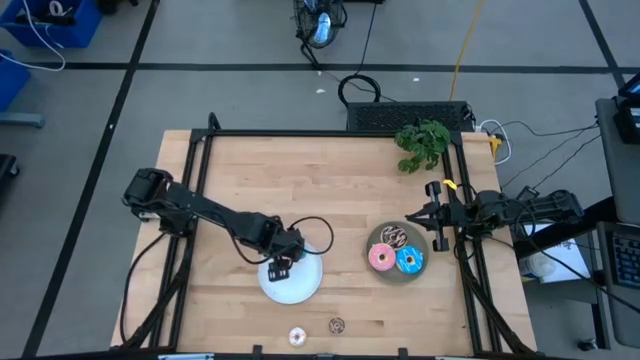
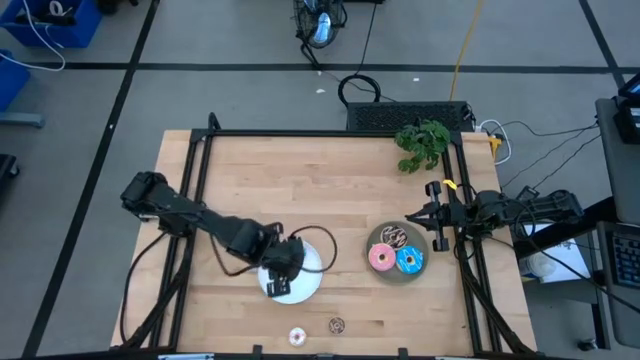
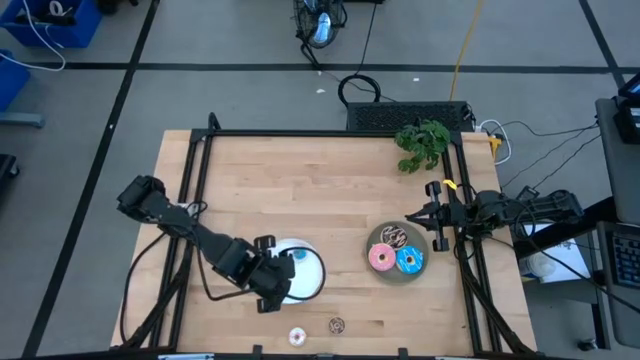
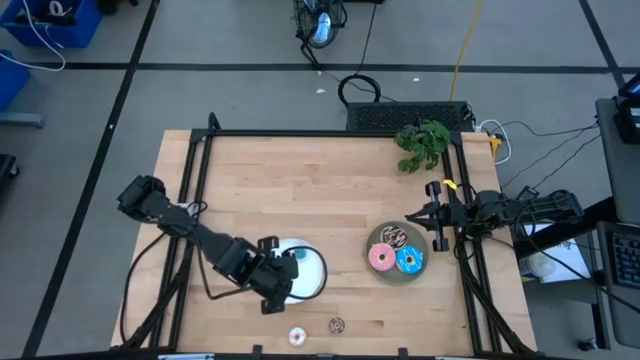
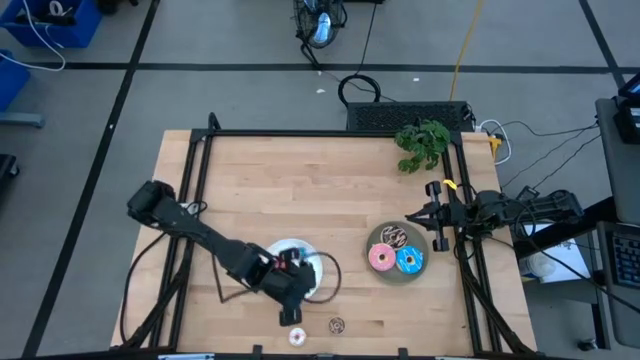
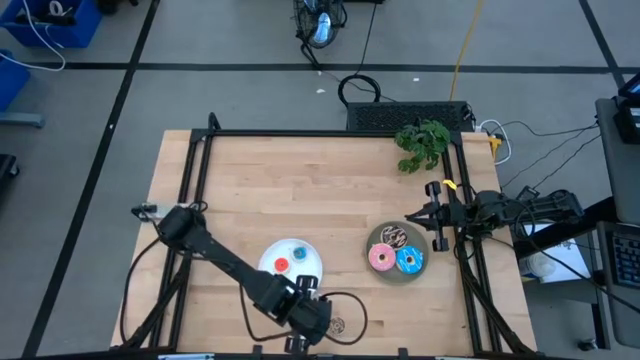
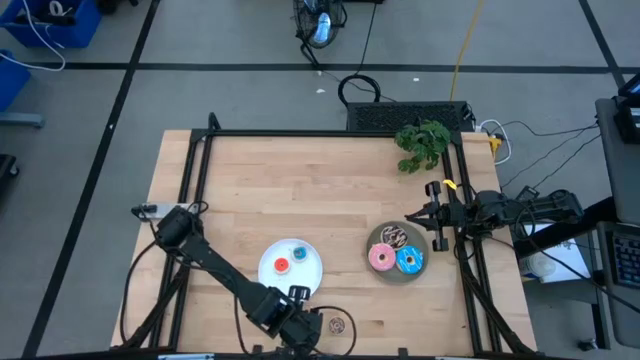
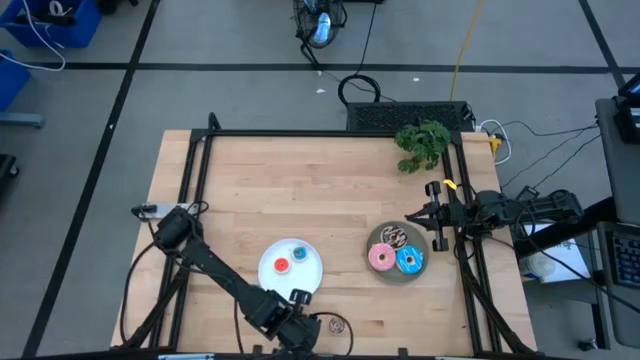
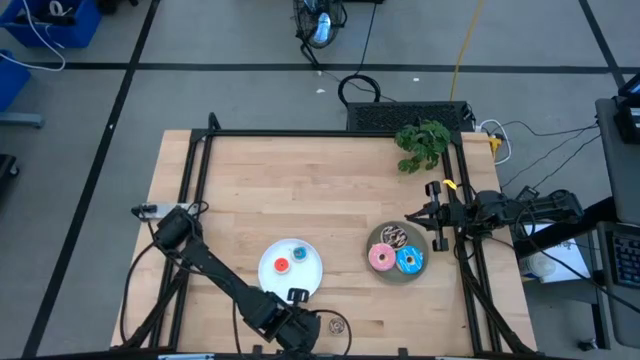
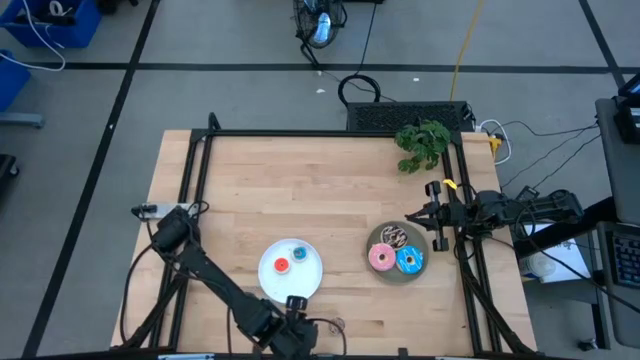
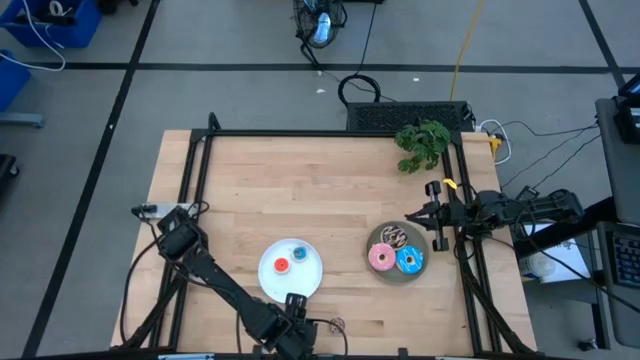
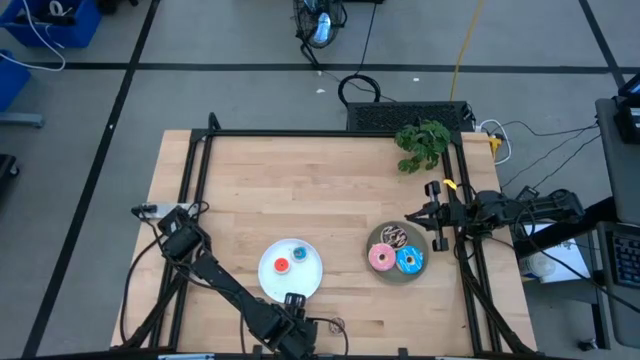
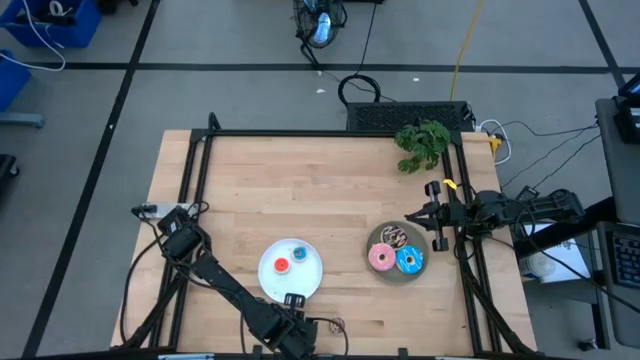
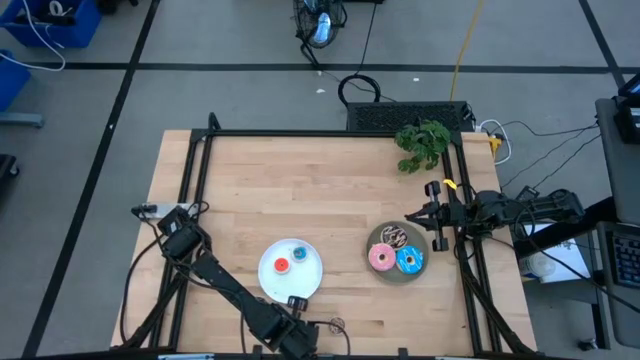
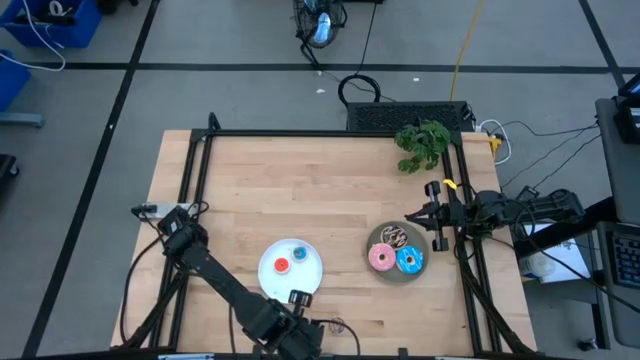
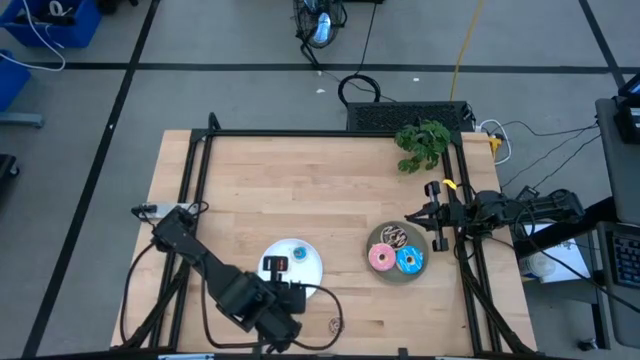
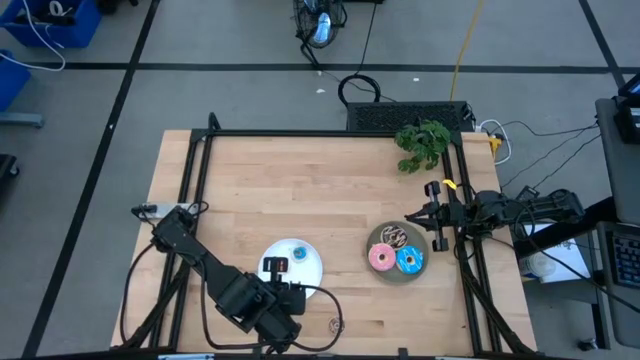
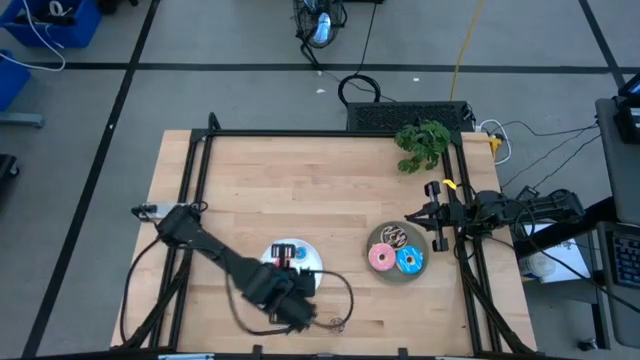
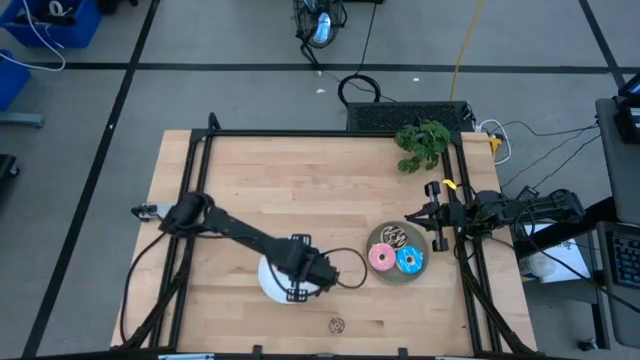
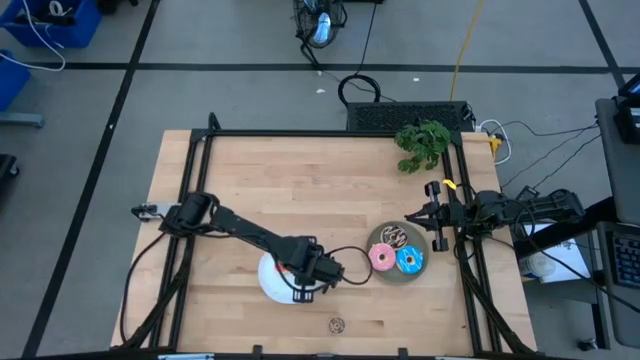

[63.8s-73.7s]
Task: Pick & Place donuts
Put the small white donut on the white plate

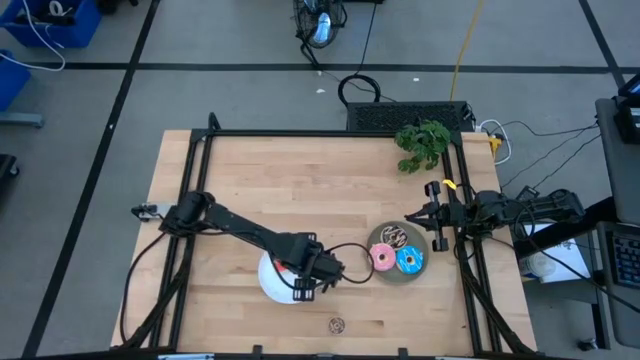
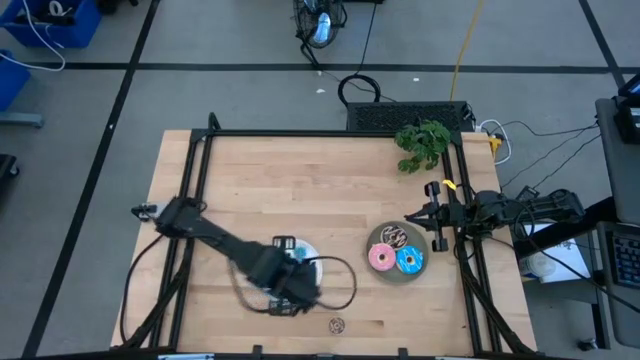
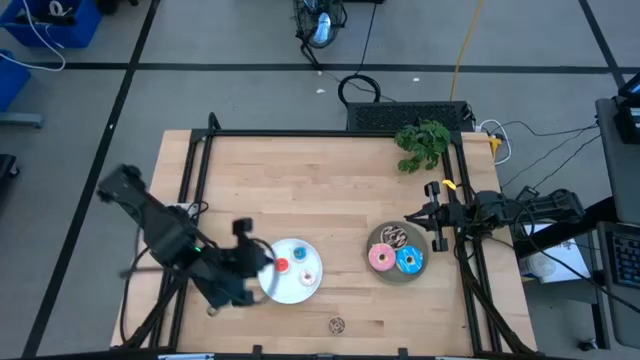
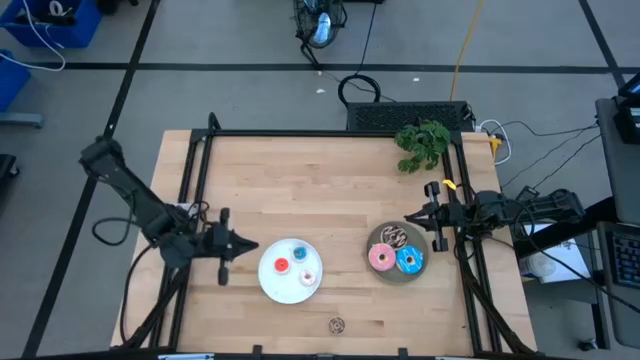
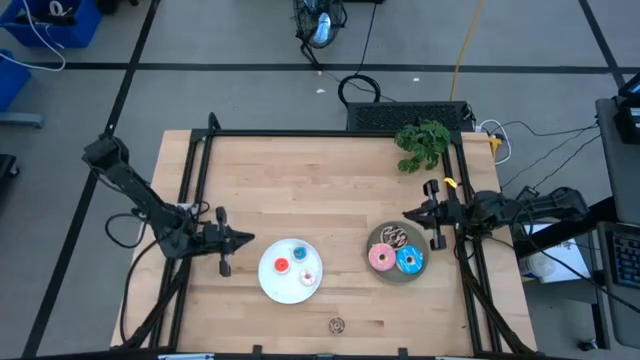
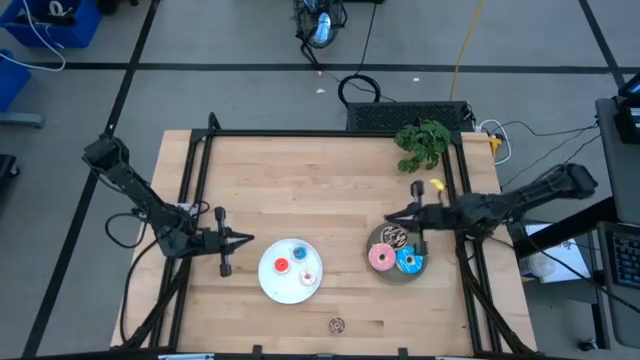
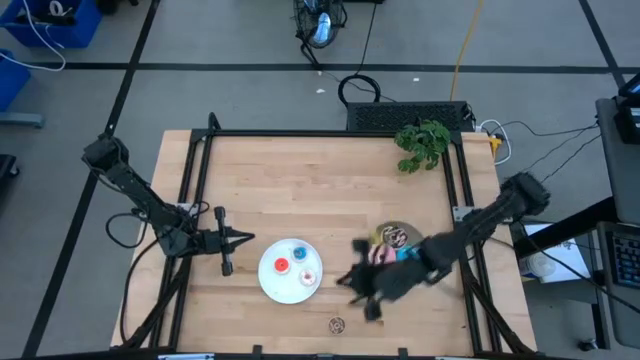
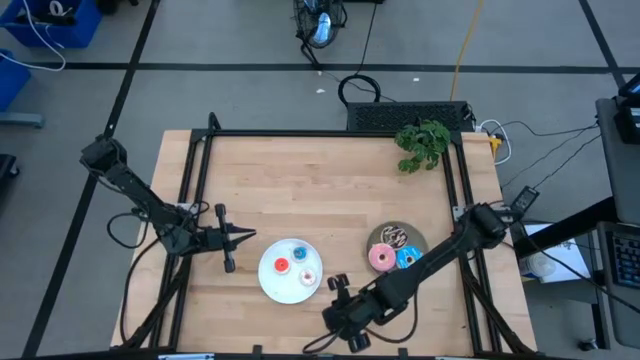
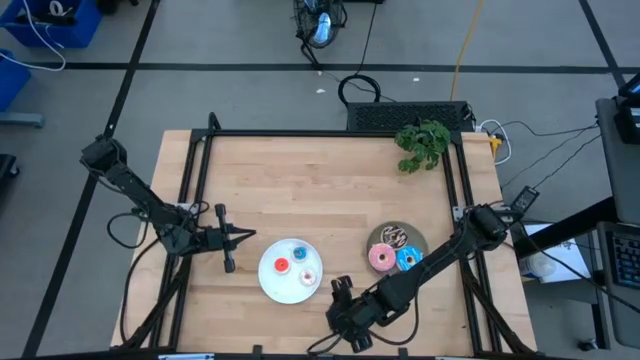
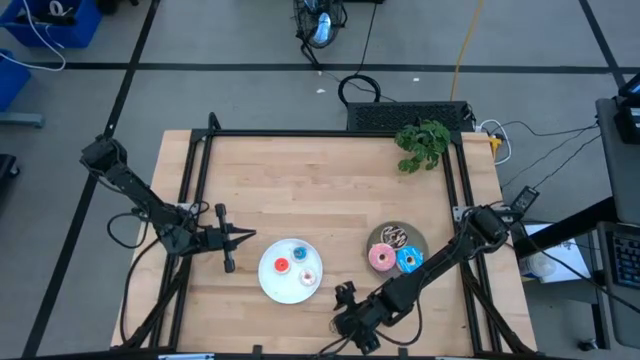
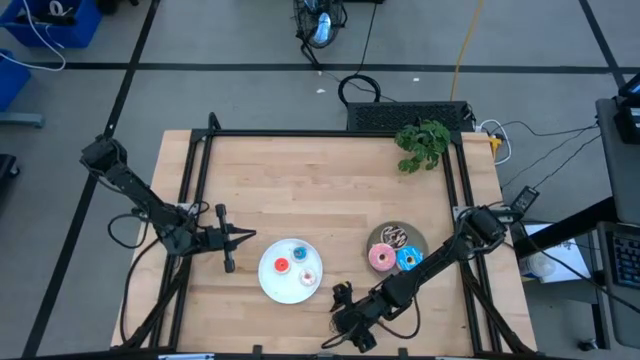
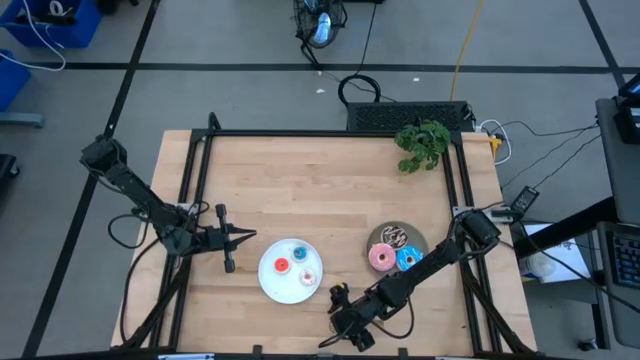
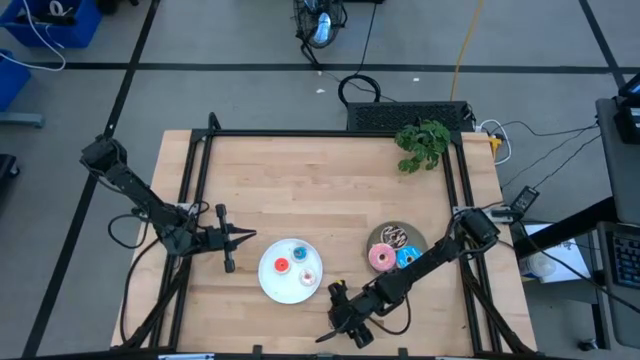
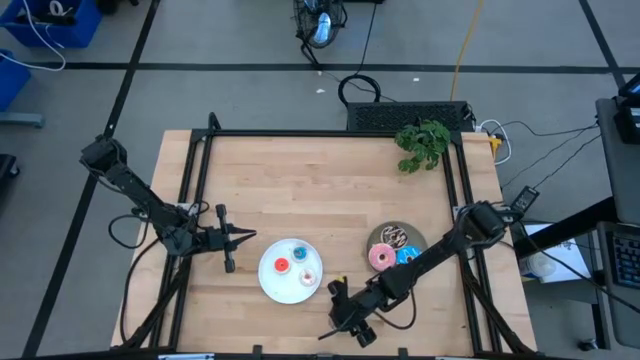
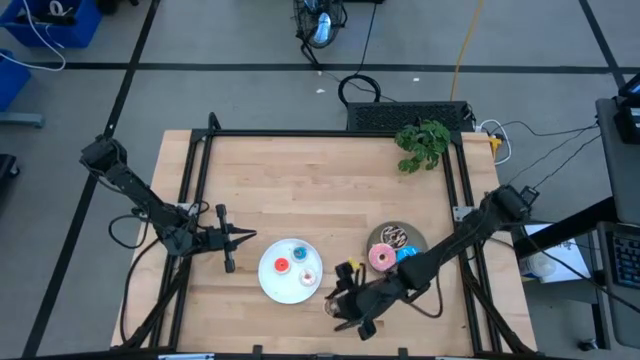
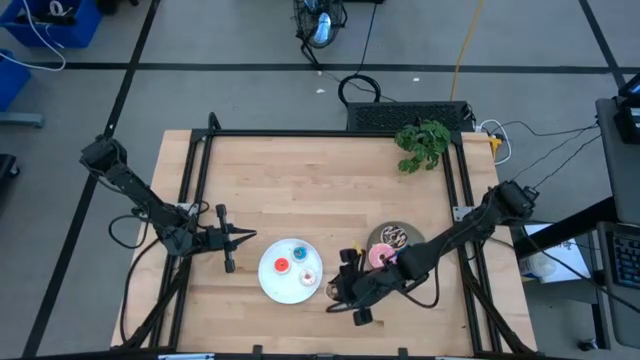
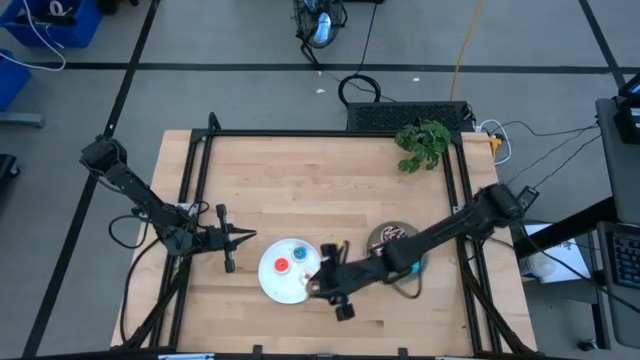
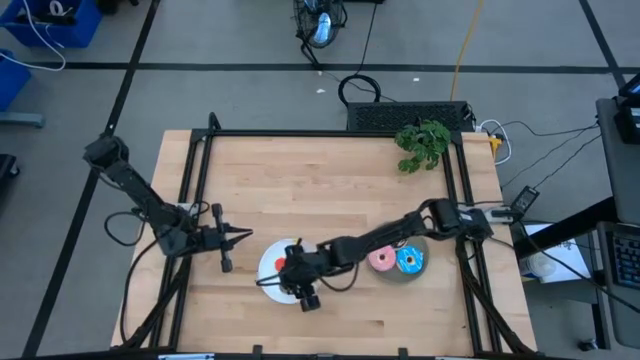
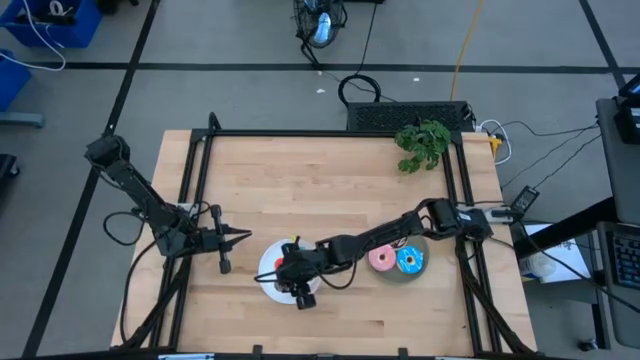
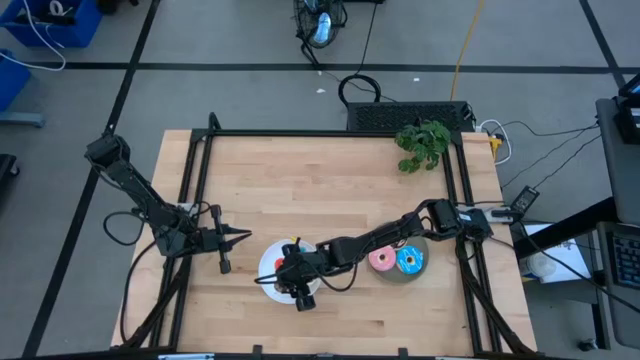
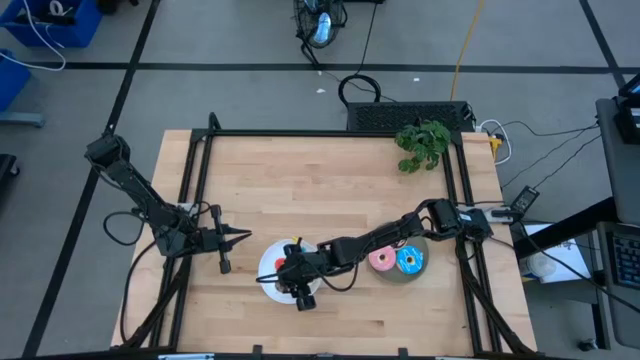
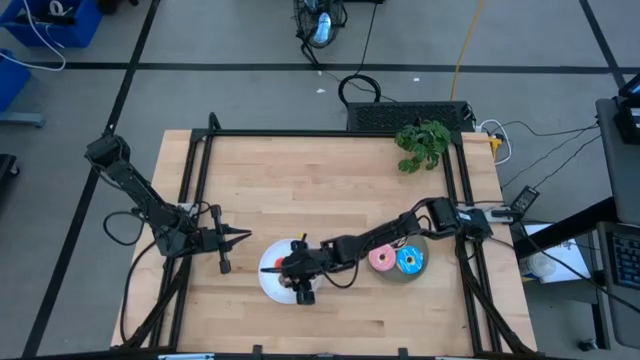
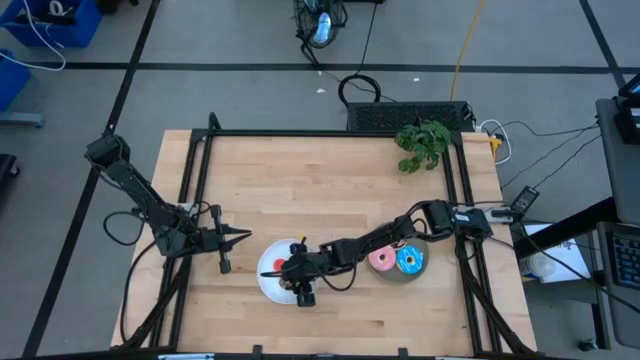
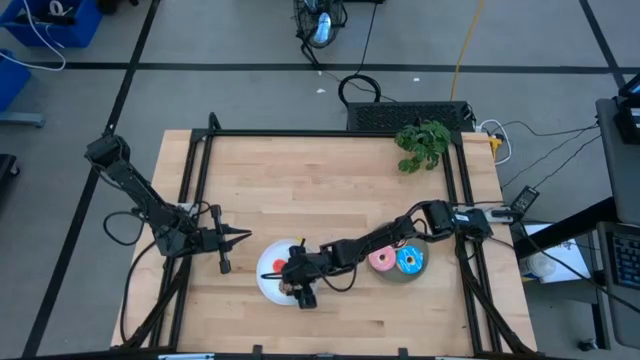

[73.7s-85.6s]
Put the small brown donut on the white plate
